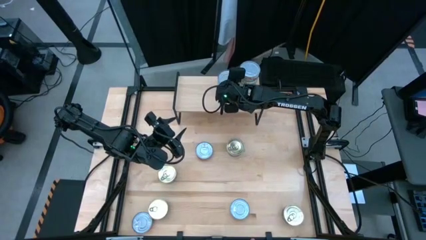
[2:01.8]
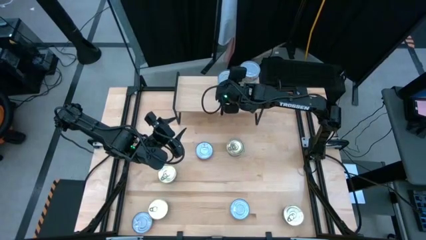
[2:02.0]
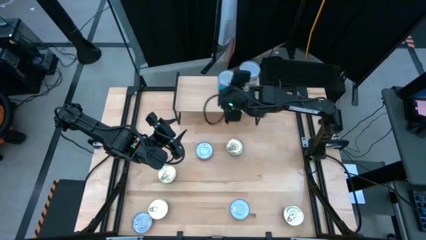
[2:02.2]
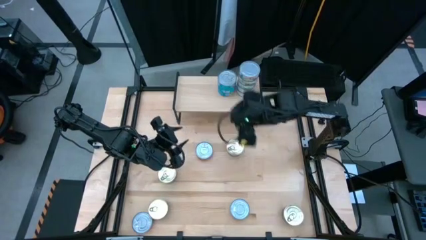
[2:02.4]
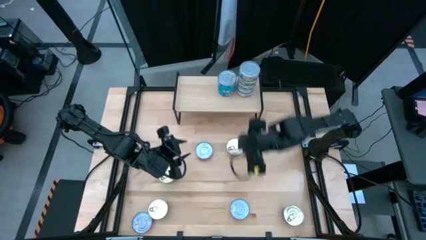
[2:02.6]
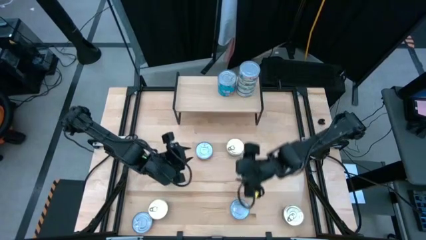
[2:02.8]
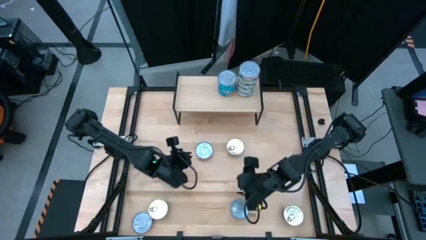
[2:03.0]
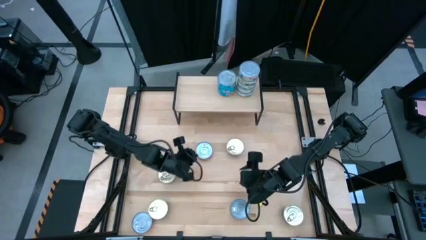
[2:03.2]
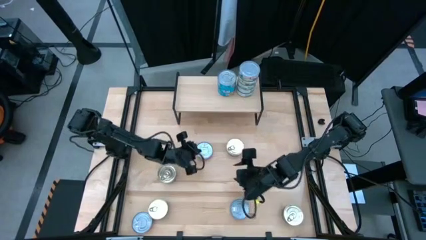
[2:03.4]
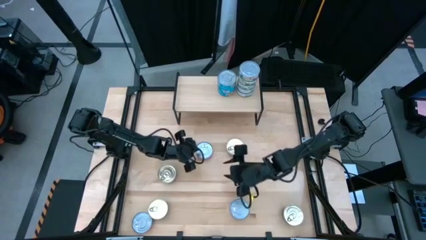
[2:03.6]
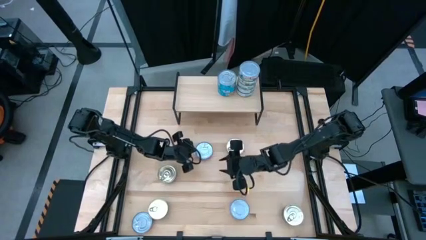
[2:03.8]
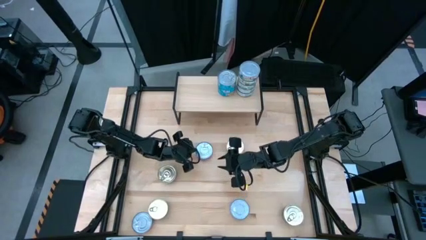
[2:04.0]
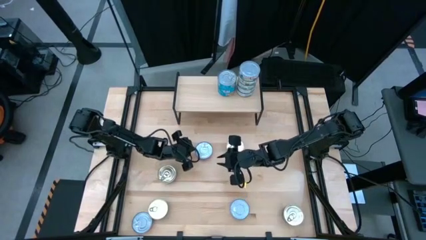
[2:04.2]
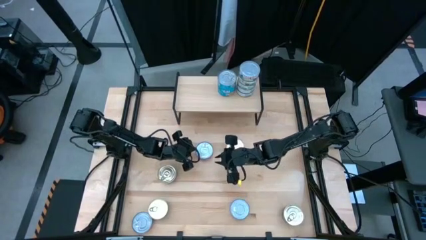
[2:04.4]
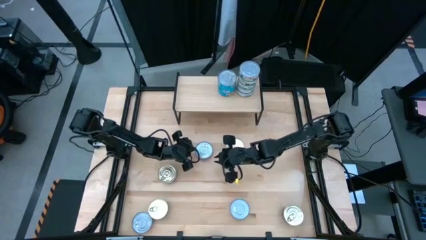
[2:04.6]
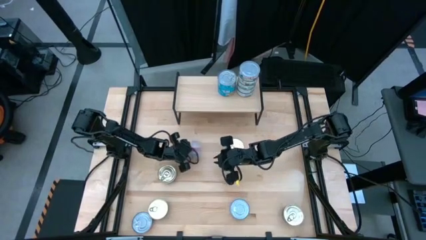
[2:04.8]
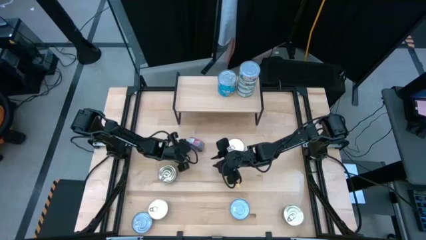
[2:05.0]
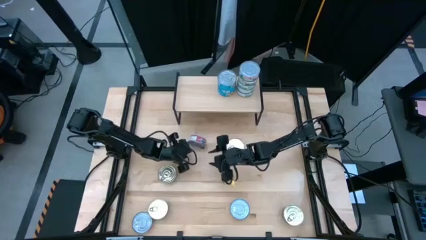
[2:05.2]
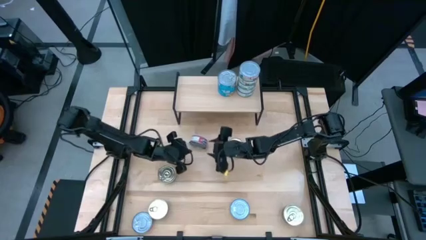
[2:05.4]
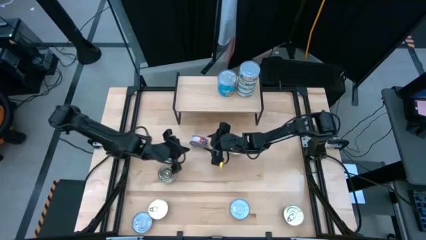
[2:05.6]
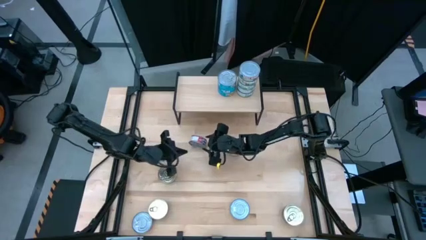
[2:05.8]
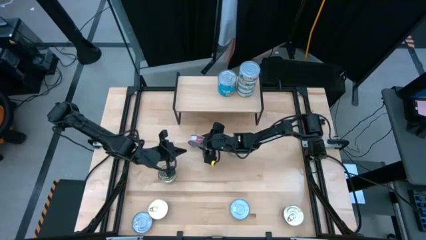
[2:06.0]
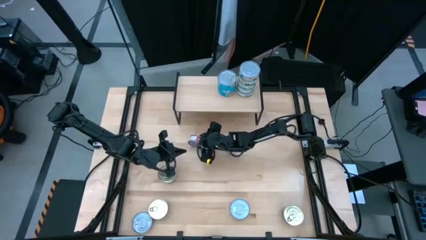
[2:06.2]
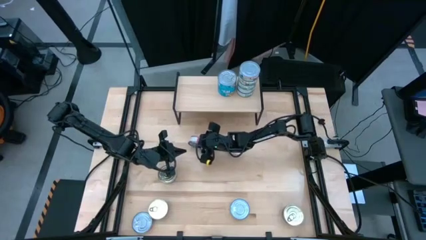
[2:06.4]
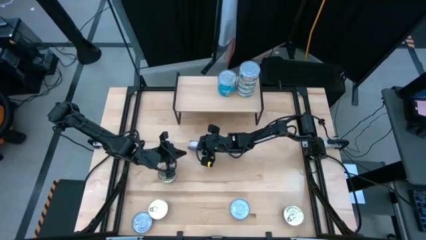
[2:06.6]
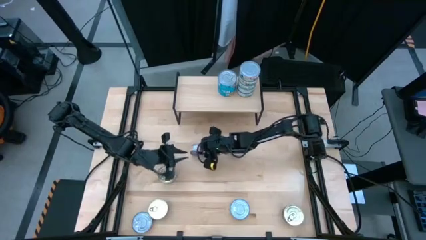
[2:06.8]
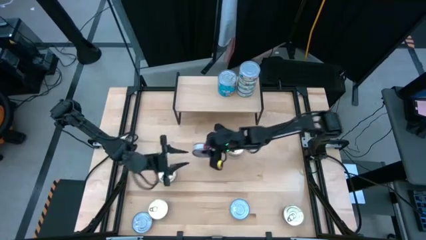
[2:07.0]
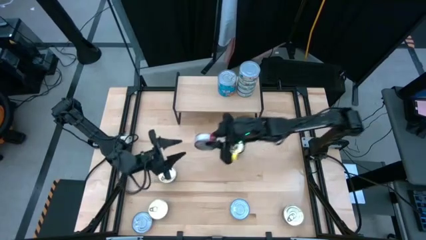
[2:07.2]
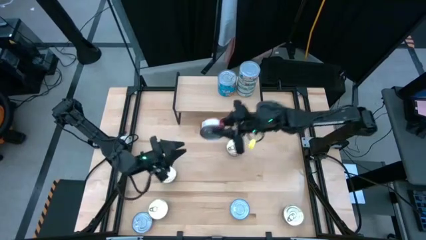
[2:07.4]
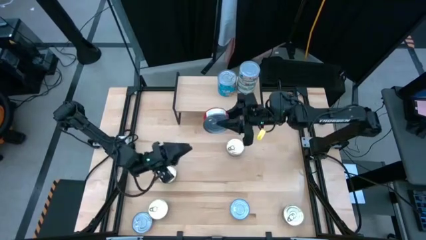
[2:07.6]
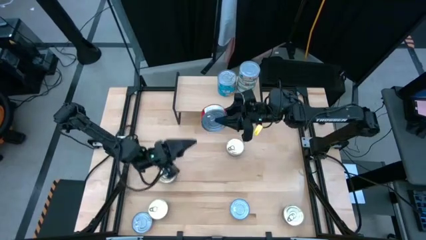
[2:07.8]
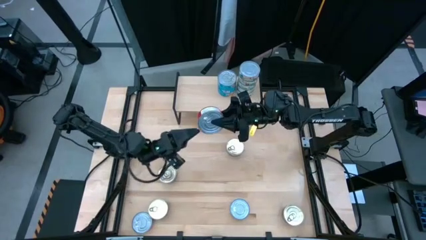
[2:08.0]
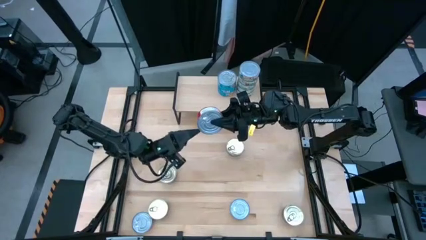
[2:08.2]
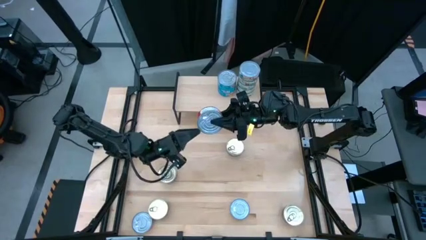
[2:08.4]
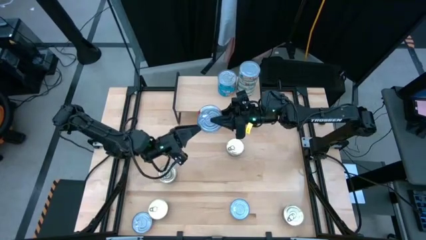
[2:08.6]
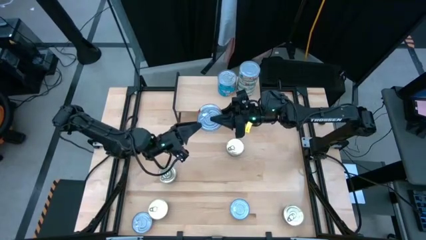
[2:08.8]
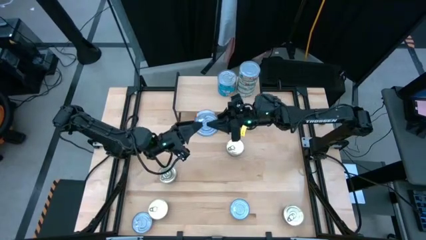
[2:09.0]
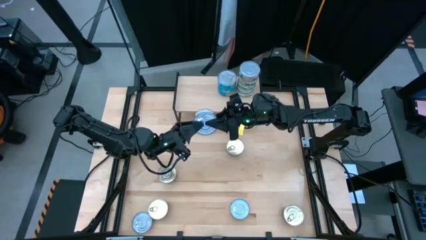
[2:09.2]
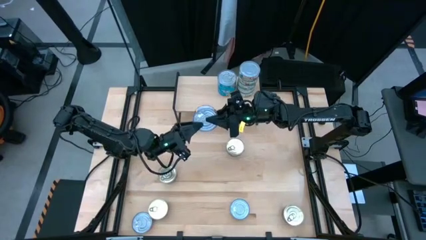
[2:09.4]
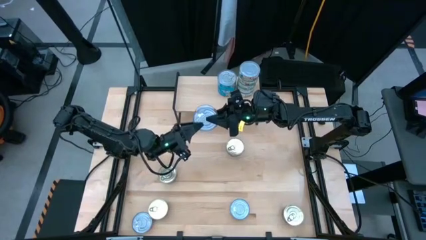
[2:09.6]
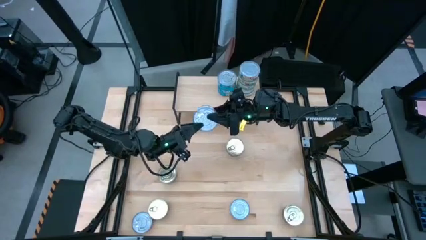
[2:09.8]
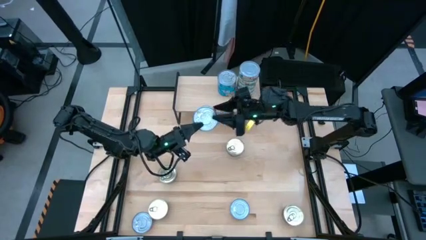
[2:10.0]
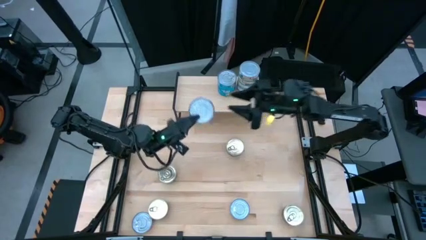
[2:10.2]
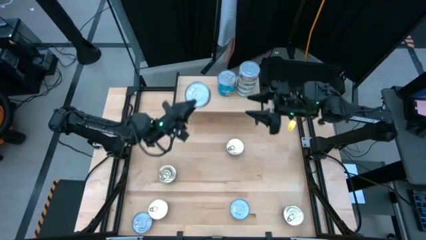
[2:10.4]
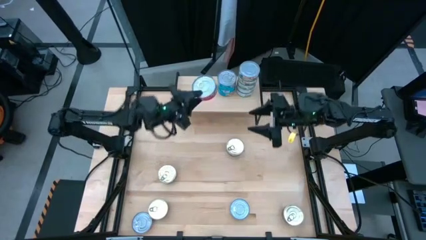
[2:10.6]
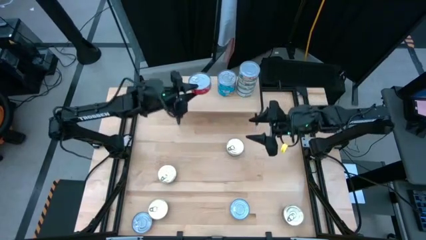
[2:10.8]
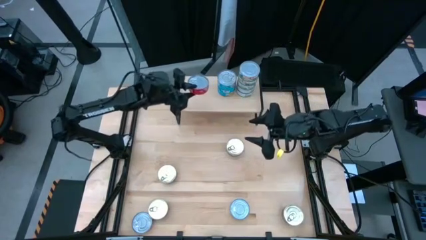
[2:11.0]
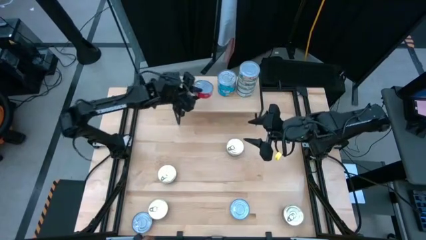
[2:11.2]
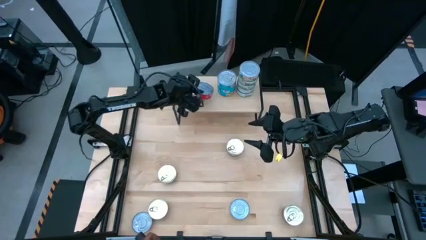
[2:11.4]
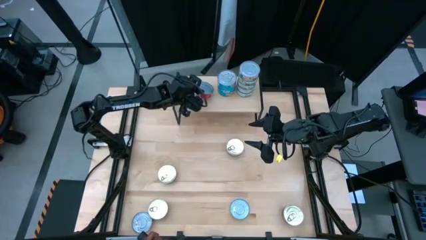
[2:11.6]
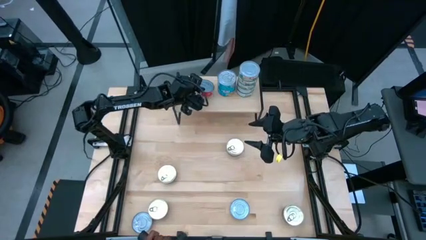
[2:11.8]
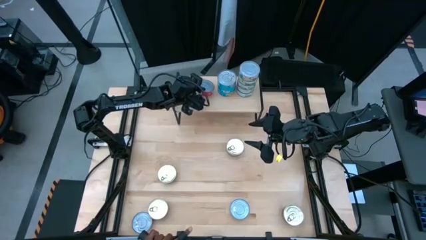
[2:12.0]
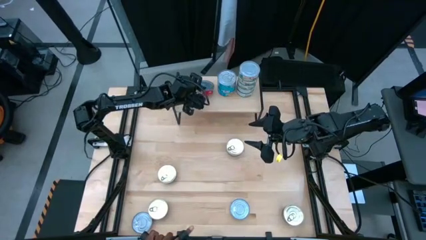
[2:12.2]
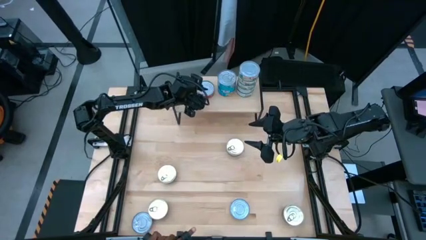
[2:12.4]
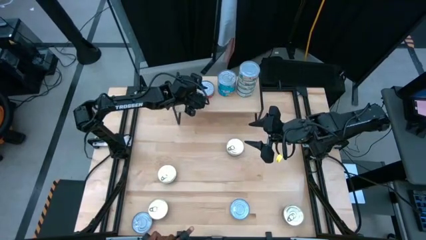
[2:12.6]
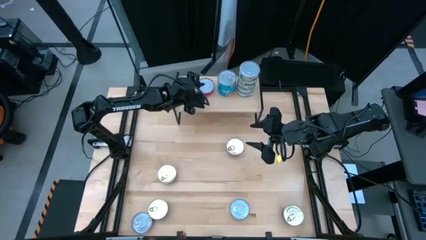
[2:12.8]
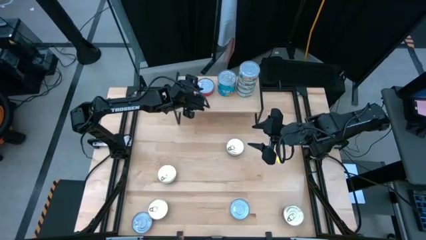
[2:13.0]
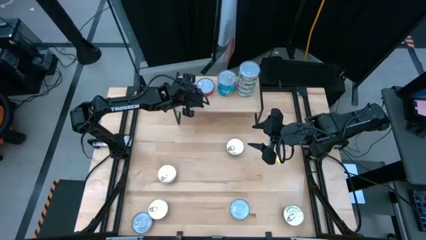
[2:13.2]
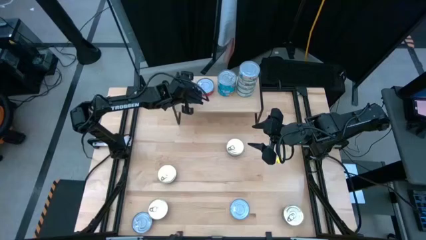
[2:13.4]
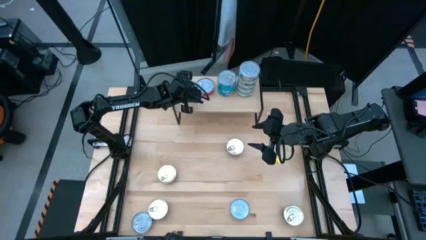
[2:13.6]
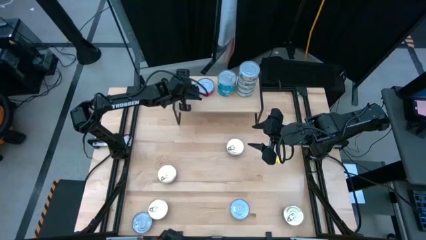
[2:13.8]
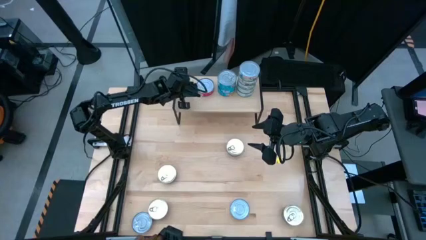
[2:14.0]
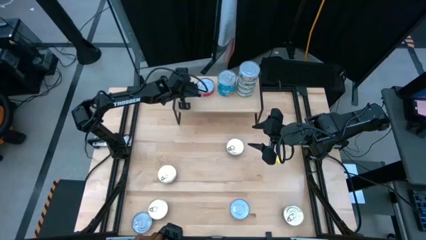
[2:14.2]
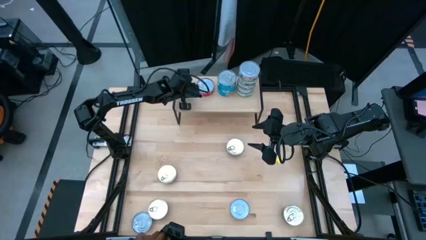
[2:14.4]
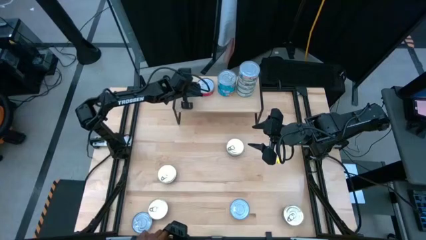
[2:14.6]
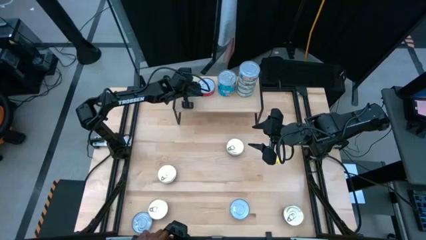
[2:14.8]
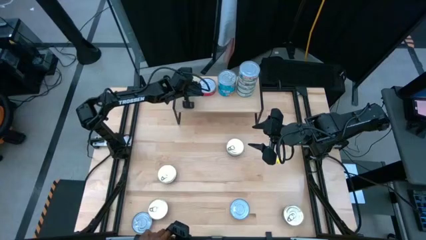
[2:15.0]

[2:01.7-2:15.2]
Task: Stack canned seafood by type on shelf
Put the red tuna can on the shelf

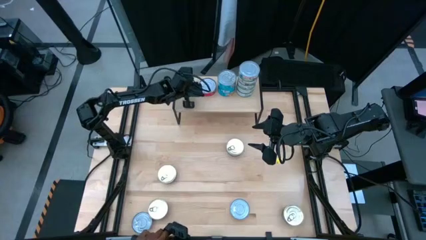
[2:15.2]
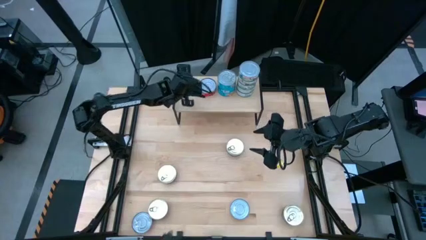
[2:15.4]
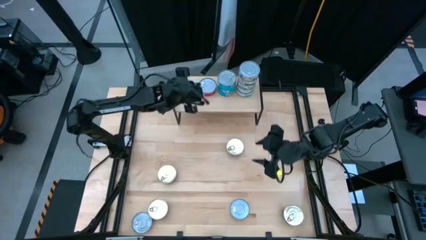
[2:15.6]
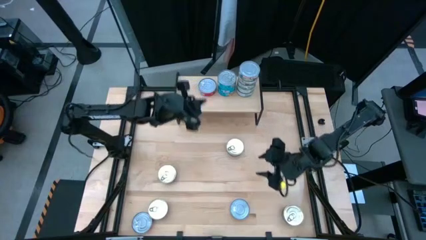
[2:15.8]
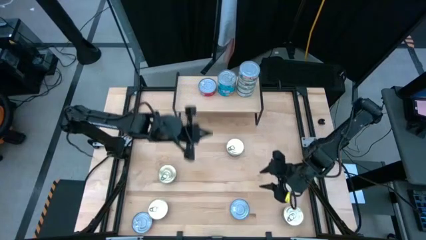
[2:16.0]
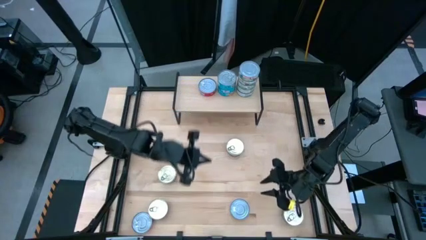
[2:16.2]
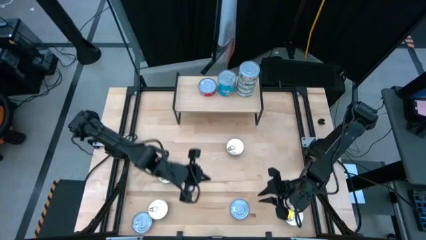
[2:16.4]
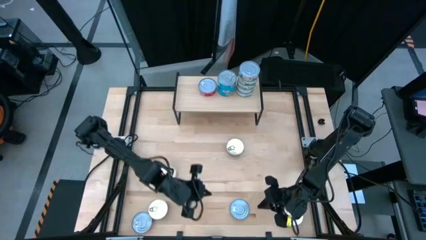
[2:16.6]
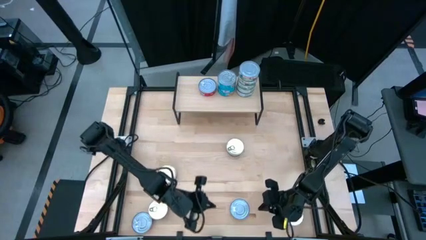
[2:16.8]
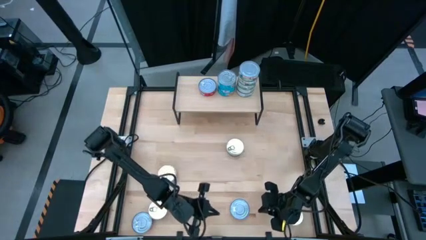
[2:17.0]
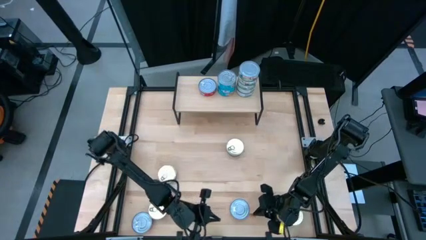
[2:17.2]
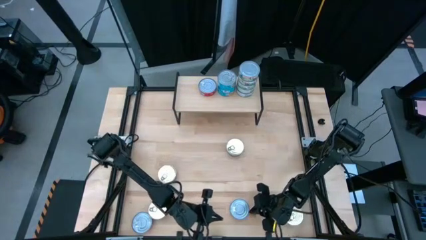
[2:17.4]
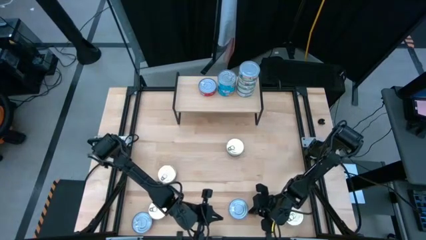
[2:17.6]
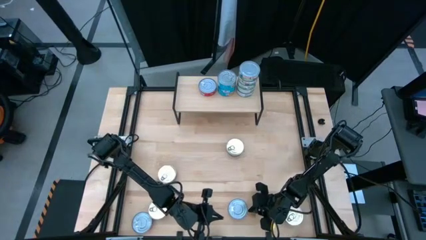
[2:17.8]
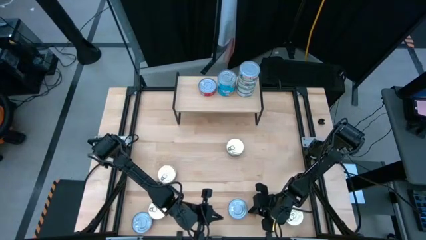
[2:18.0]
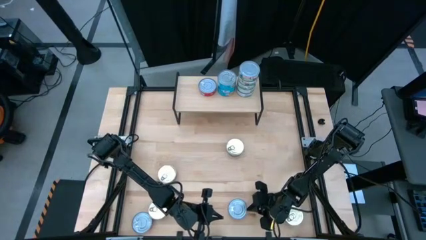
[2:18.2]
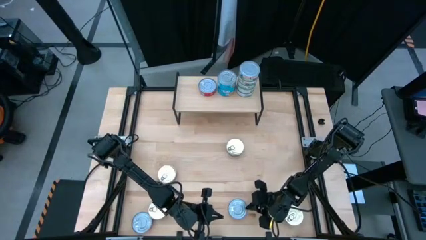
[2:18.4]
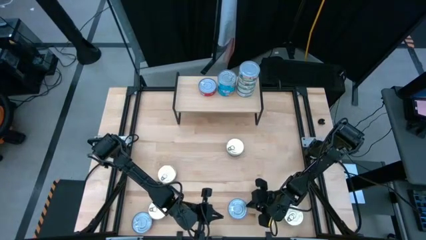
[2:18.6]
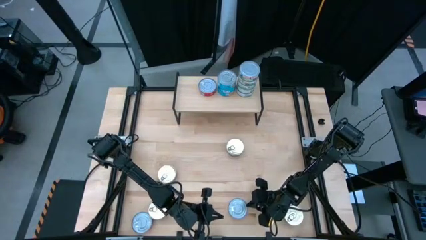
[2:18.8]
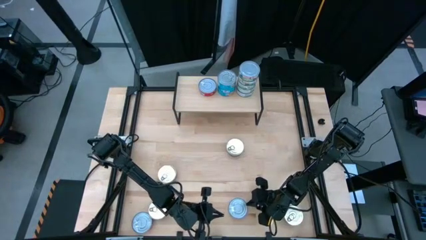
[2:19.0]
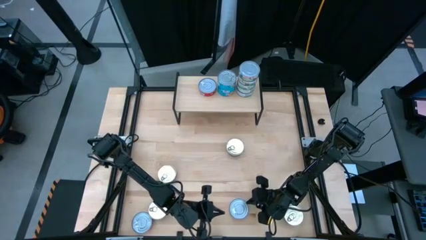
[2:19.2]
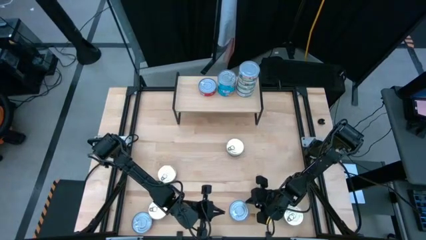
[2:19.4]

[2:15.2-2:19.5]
Stack the red tuna can on top of the other red tuna can on the shelf
